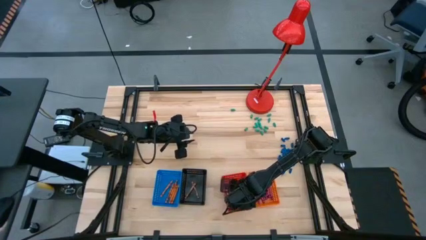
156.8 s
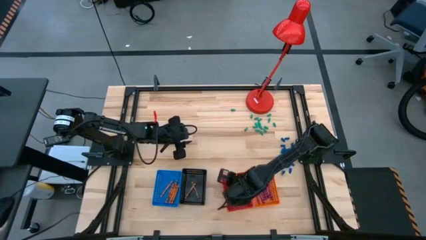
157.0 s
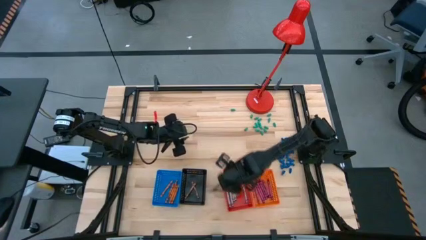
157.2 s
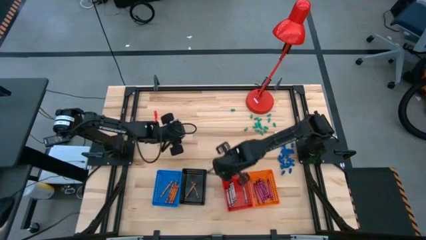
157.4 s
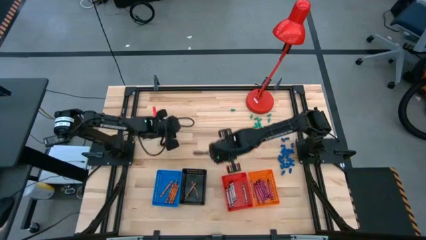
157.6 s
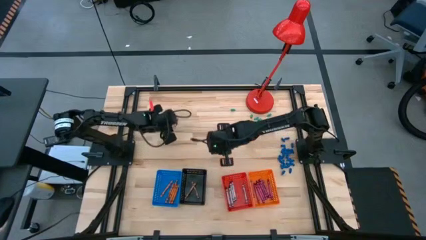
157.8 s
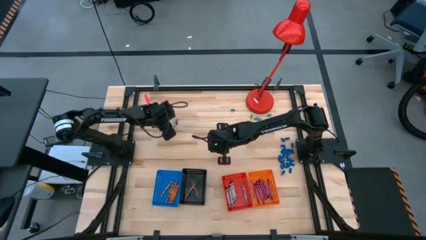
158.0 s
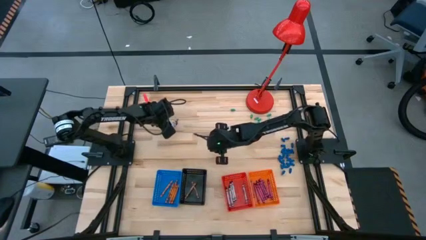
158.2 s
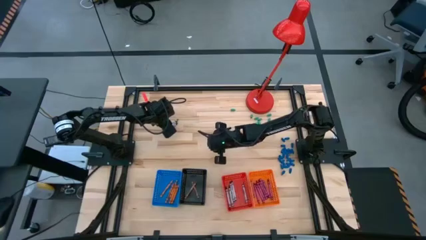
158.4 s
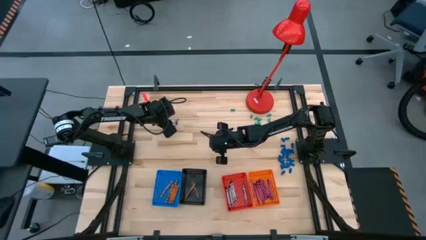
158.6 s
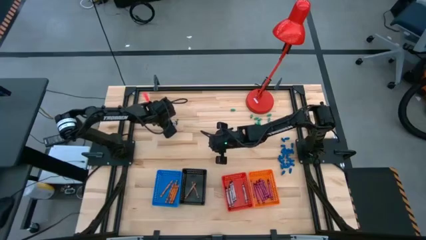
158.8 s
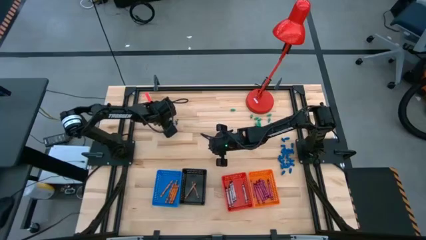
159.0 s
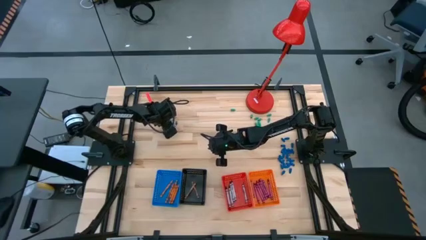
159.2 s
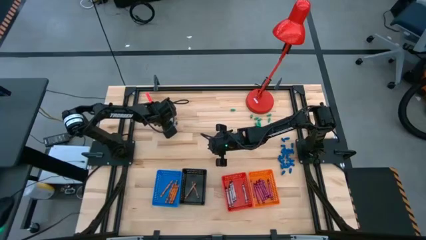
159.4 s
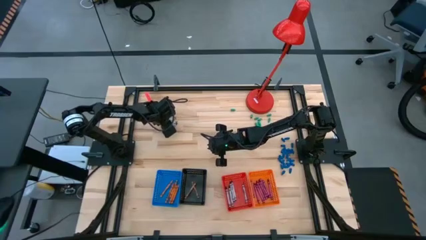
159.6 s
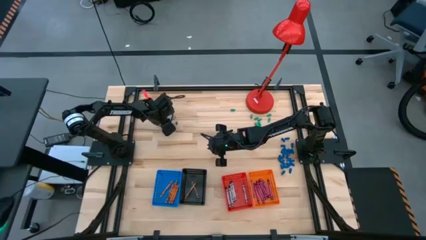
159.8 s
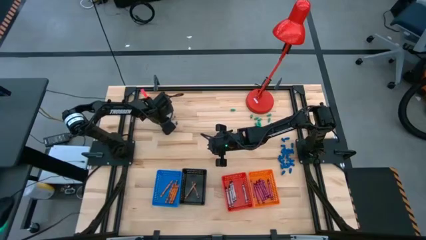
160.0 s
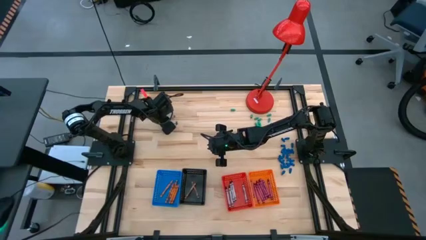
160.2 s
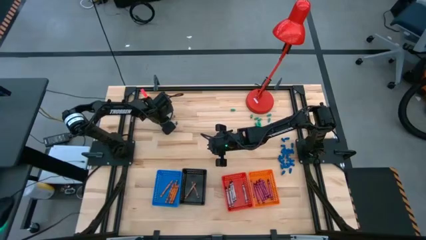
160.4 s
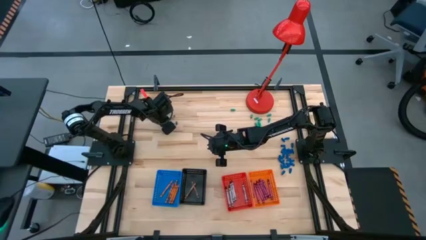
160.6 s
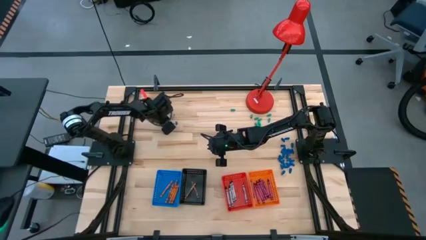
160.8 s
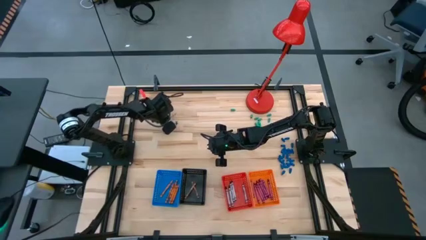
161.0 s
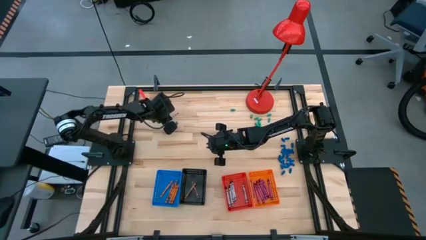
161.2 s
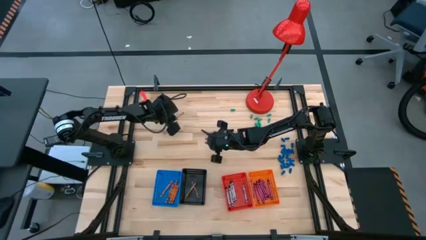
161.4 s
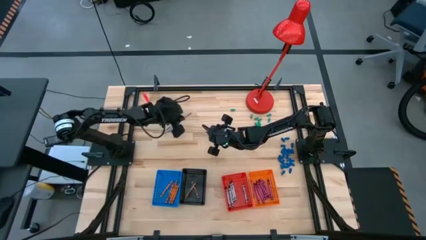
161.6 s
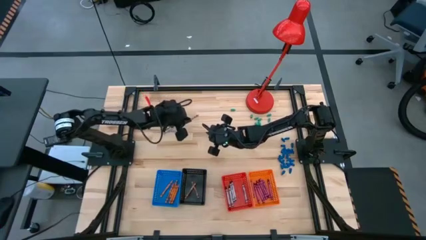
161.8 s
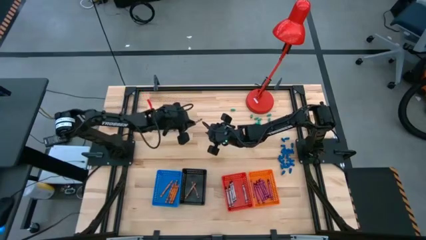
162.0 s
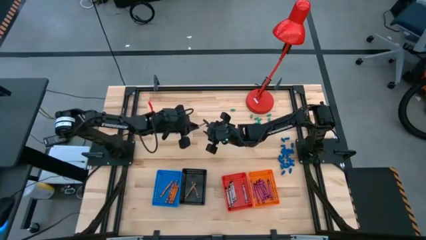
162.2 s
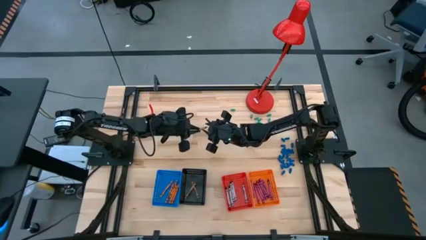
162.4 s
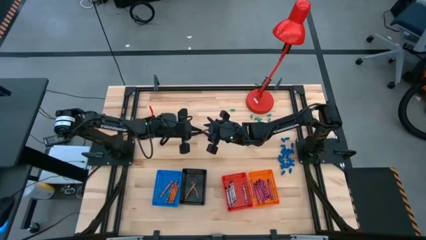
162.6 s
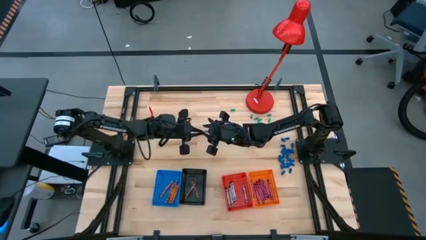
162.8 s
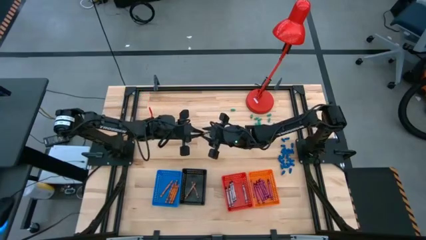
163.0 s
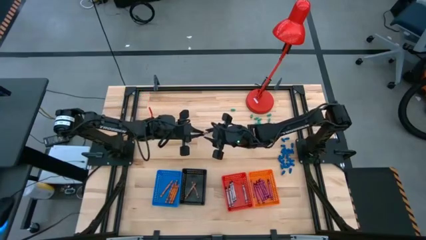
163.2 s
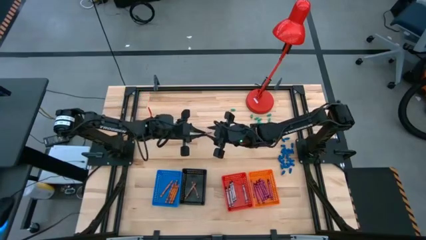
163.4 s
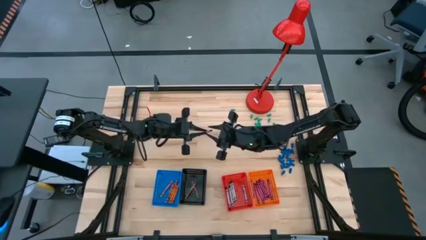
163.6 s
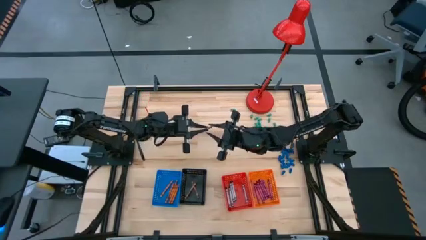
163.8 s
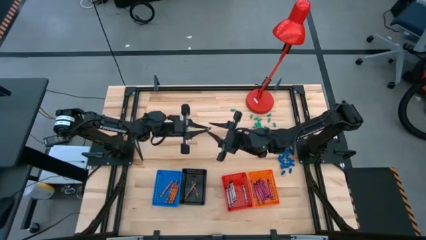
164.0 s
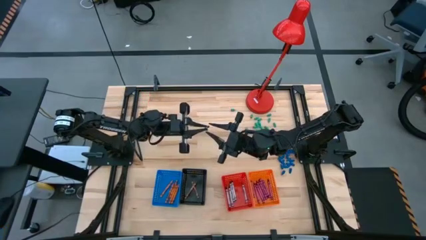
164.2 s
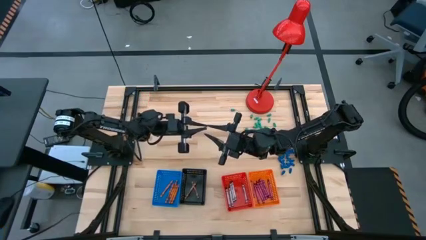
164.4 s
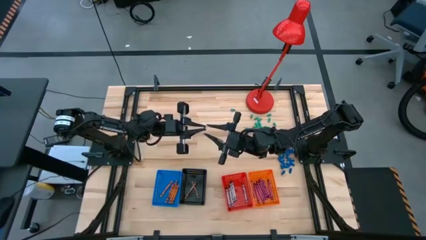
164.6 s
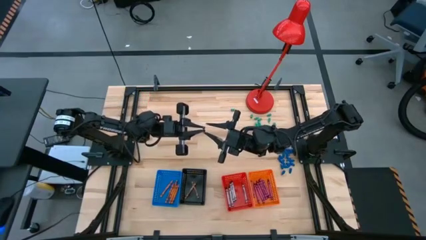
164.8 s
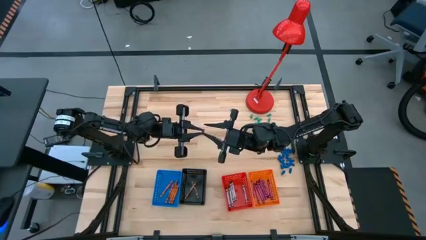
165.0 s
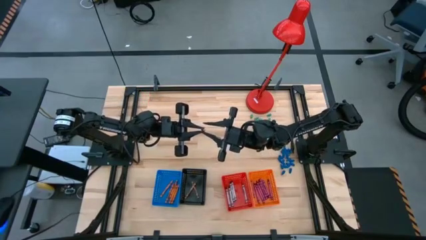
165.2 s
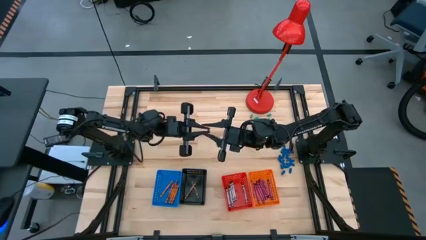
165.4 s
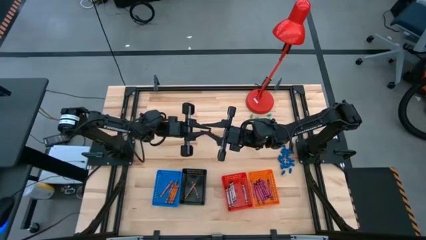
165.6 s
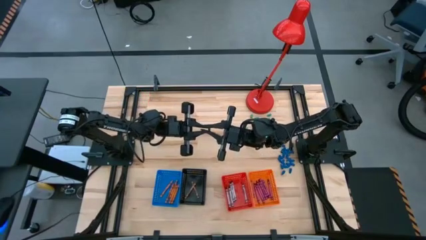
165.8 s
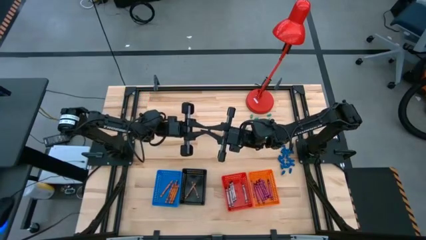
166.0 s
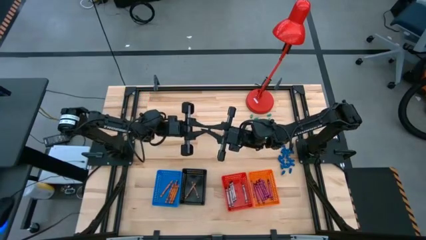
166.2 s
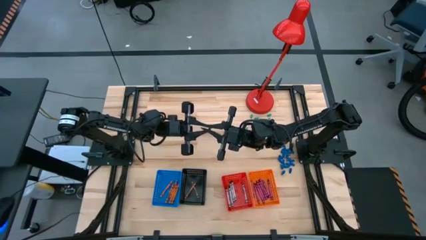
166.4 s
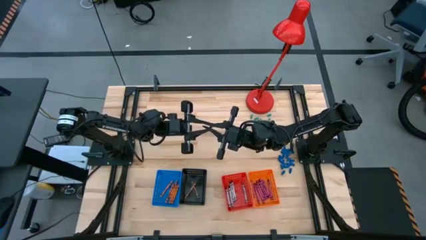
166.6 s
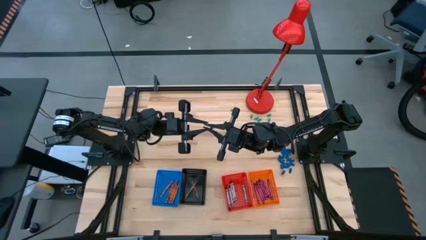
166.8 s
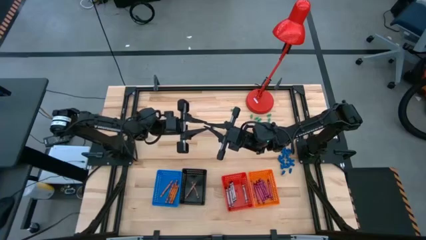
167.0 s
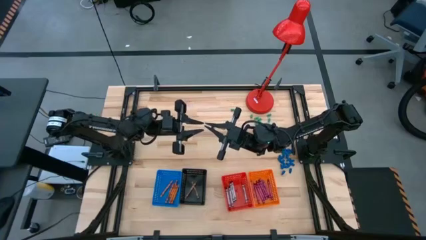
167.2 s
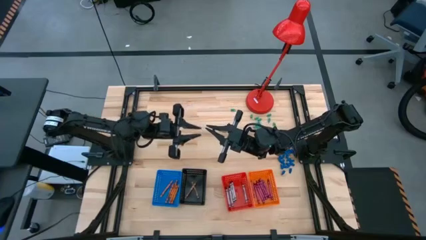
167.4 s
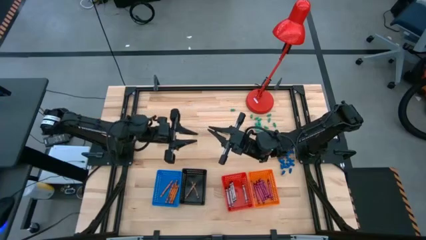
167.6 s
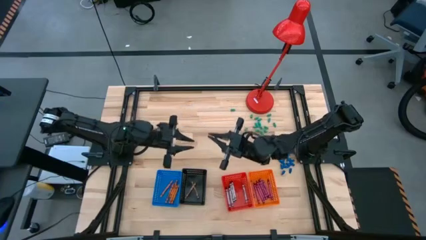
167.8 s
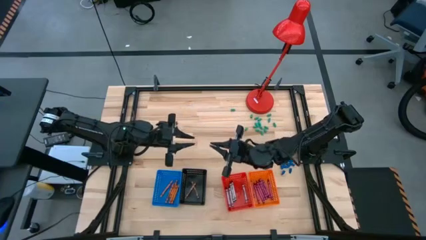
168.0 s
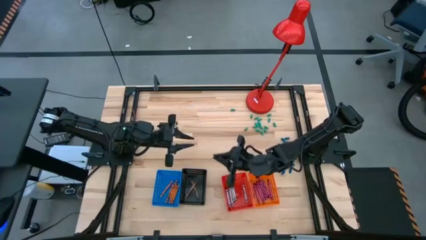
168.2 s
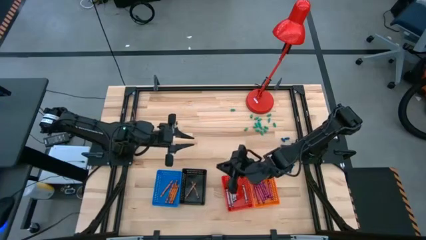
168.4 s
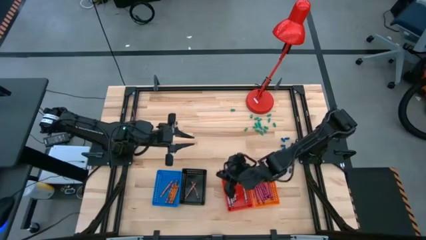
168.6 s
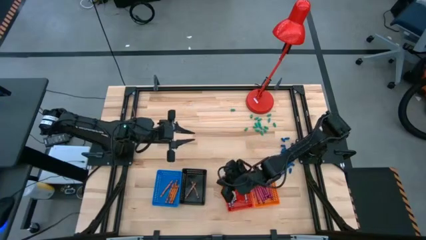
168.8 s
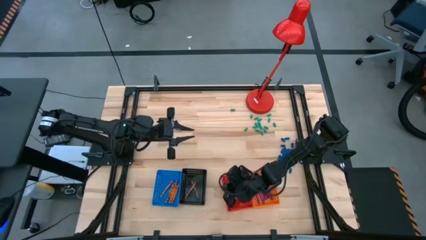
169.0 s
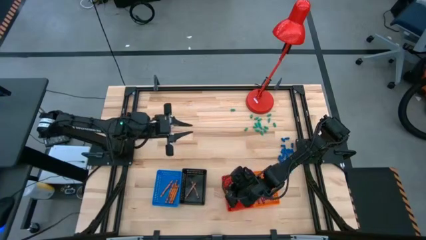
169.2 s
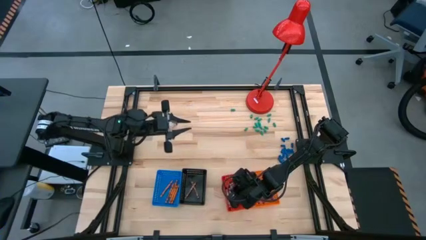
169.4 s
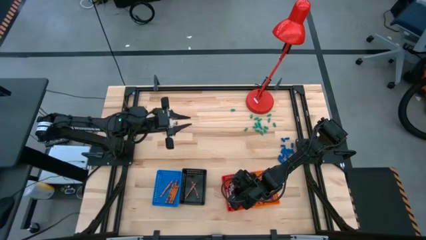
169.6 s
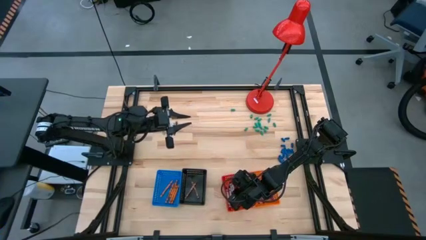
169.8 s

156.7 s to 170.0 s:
Task: Sort crayons
Put the black crayon into the red basket

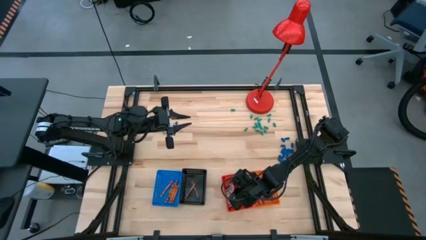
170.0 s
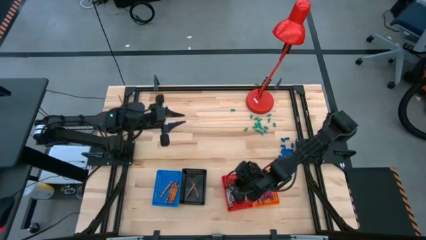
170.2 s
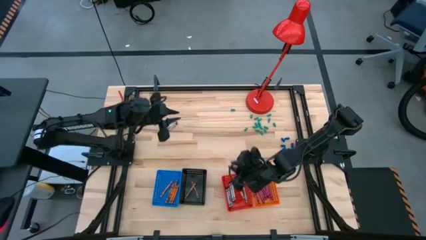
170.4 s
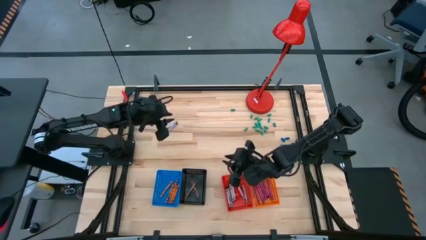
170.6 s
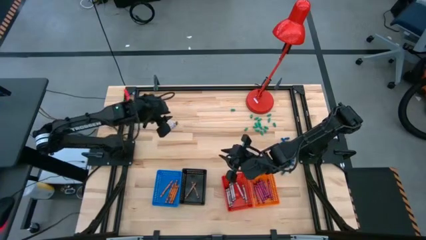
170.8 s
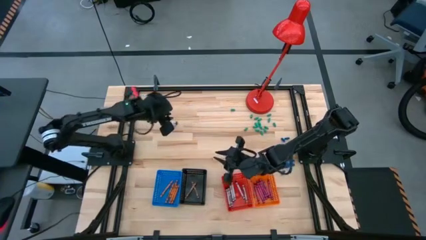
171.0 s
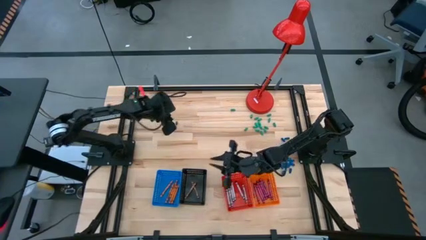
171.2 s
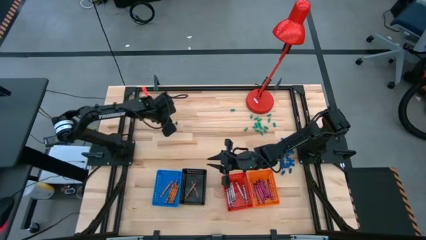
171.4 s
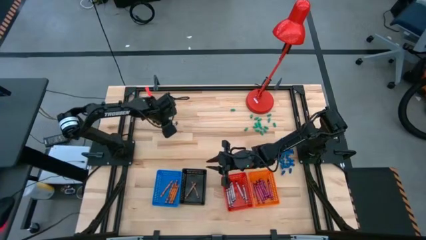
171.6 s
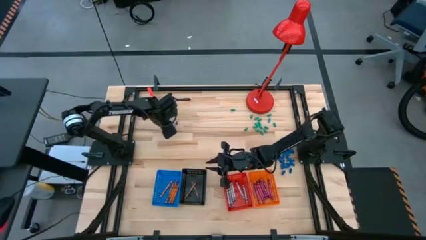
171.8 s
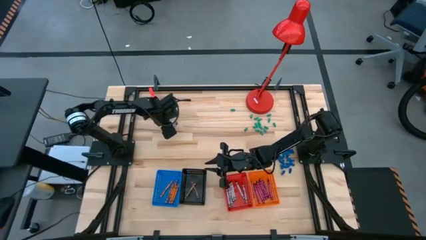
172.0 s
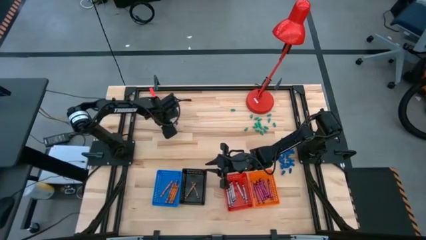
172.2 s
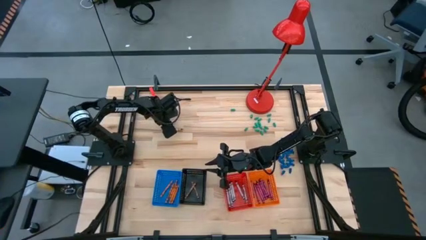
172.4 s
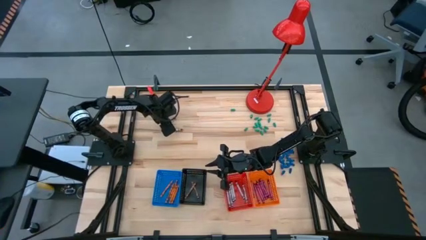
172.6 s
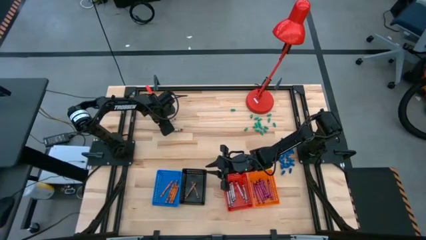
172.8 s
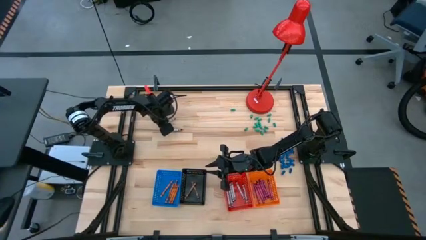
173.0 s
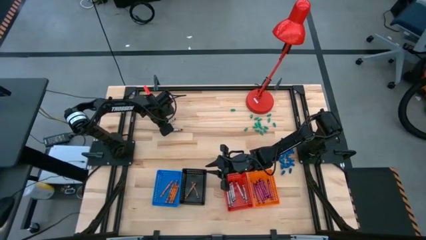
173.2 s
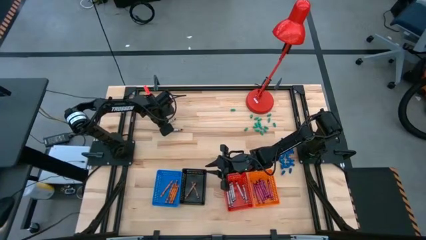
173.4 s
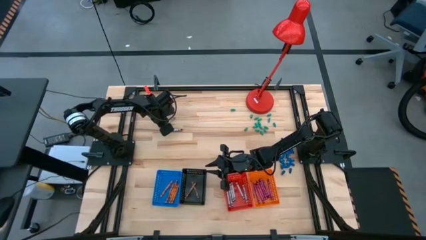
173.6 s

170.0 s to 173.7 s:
Put the black crayon into the red basket
